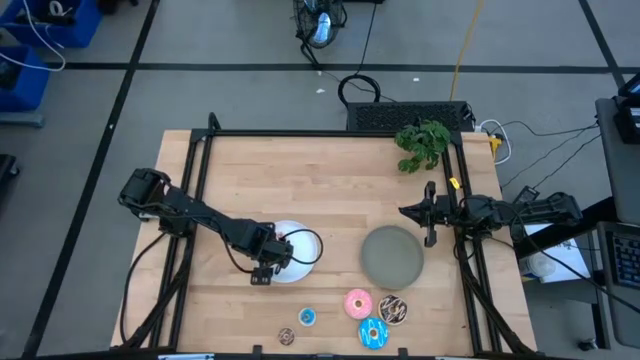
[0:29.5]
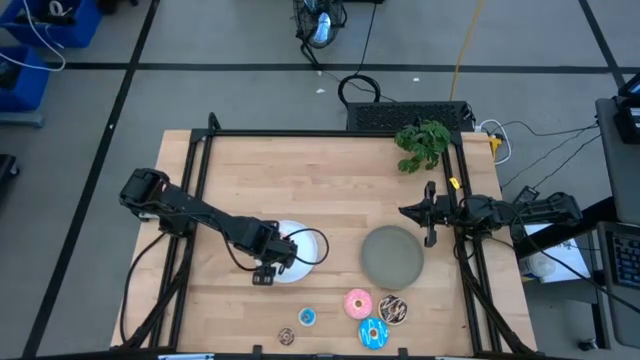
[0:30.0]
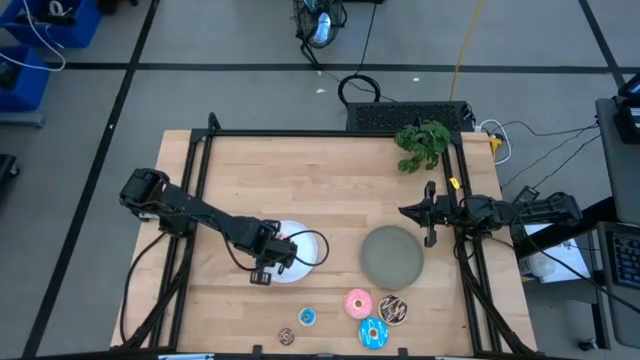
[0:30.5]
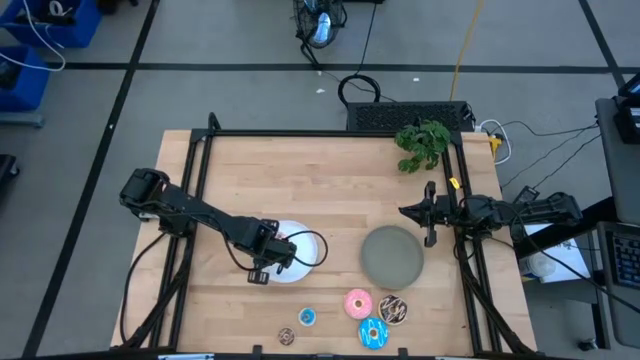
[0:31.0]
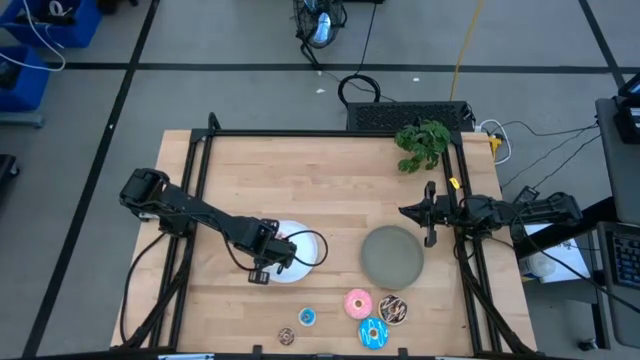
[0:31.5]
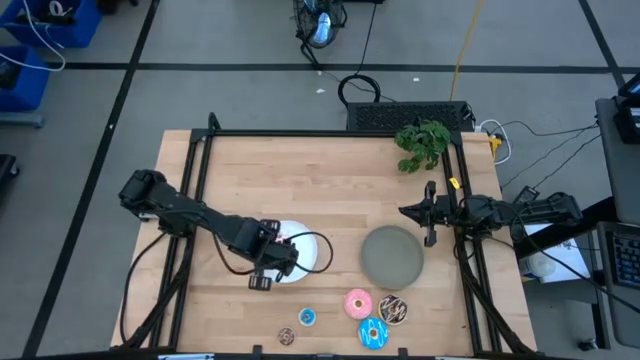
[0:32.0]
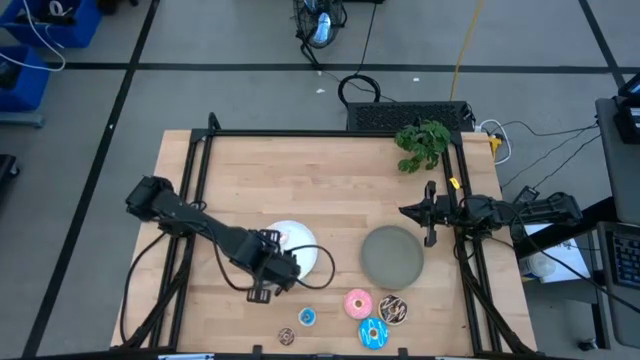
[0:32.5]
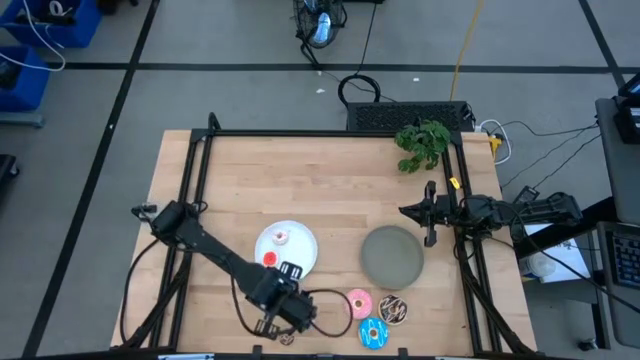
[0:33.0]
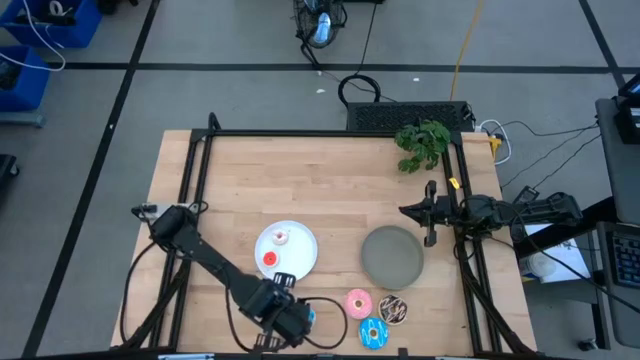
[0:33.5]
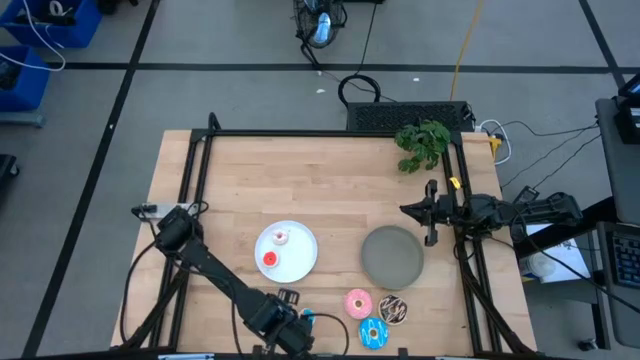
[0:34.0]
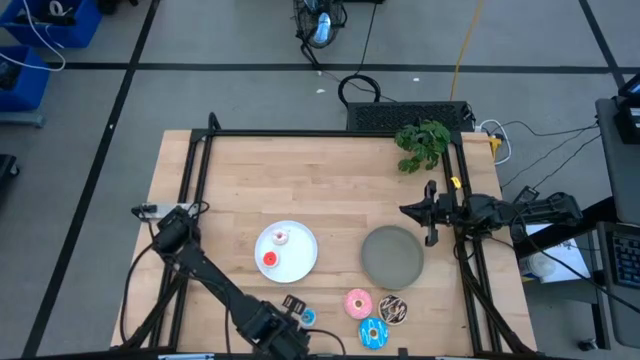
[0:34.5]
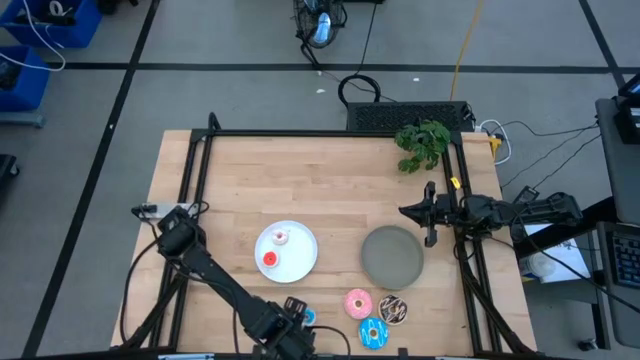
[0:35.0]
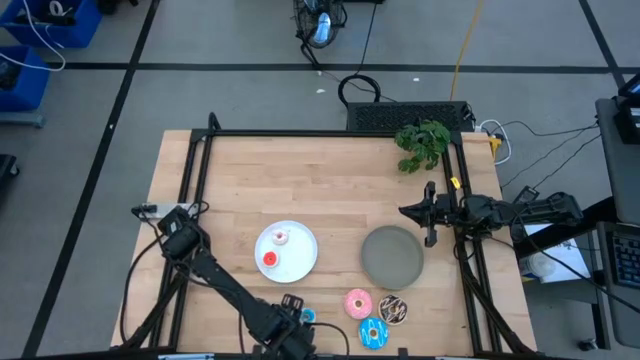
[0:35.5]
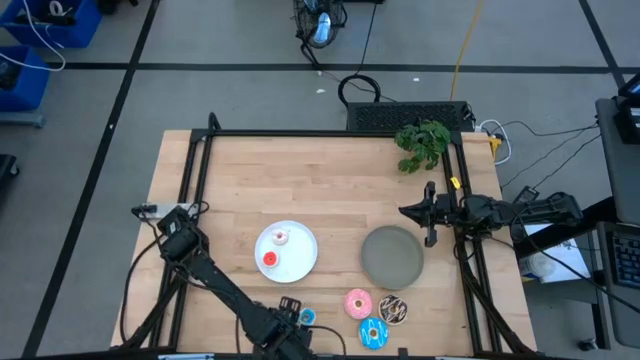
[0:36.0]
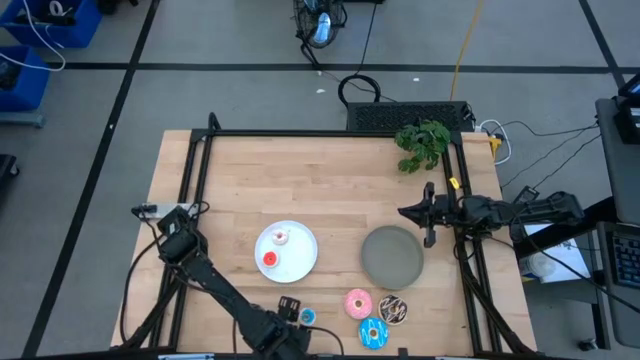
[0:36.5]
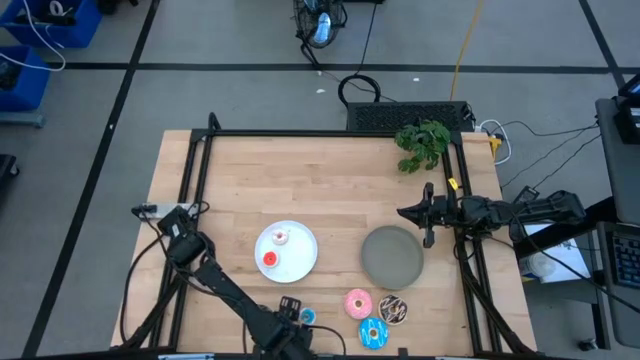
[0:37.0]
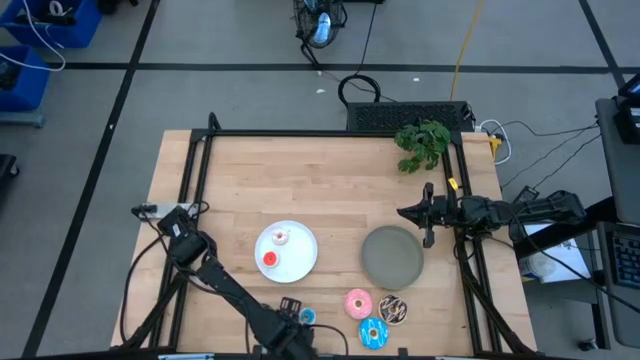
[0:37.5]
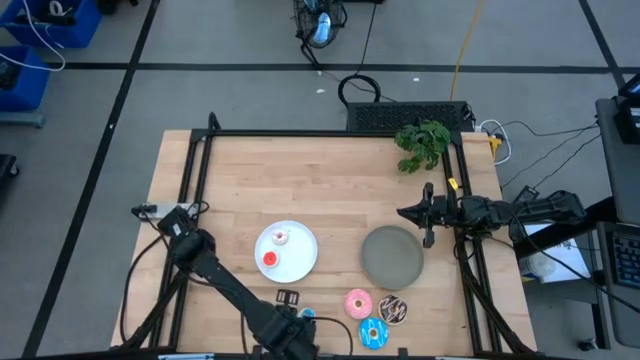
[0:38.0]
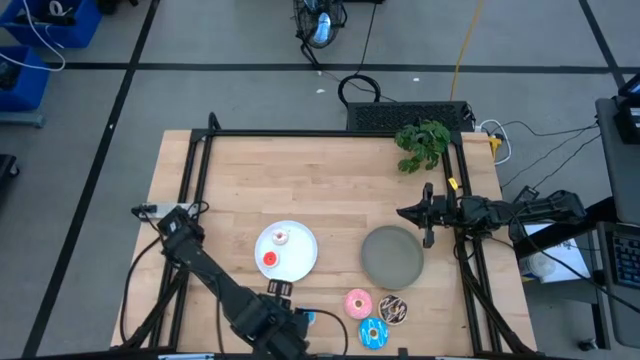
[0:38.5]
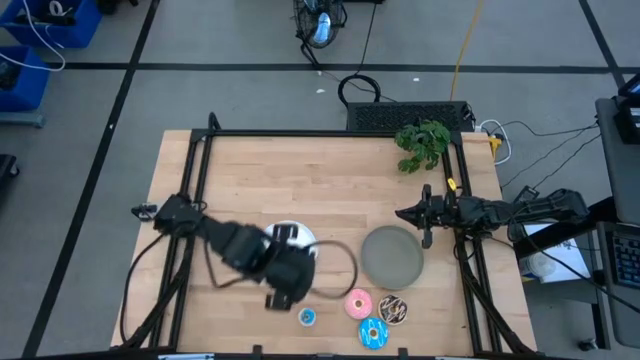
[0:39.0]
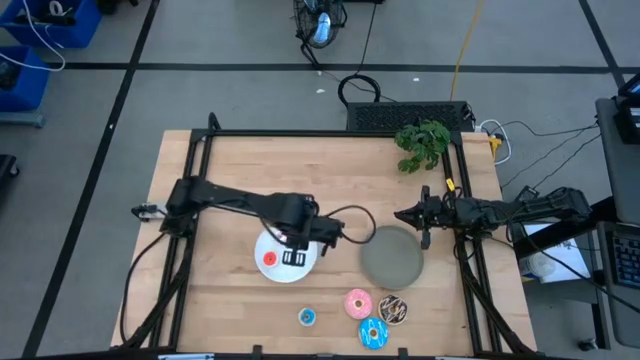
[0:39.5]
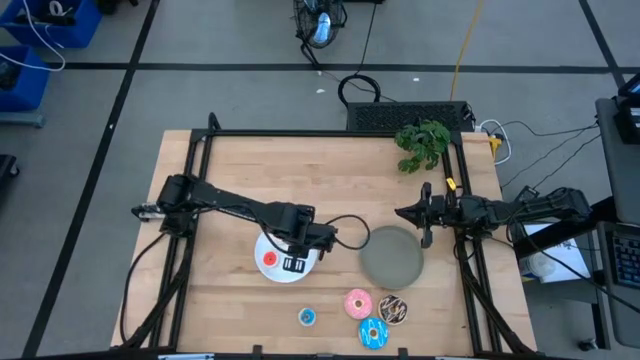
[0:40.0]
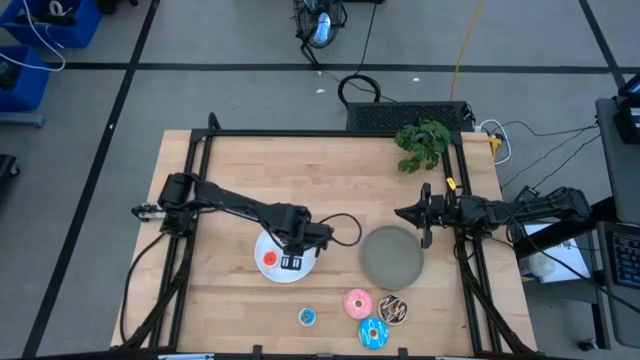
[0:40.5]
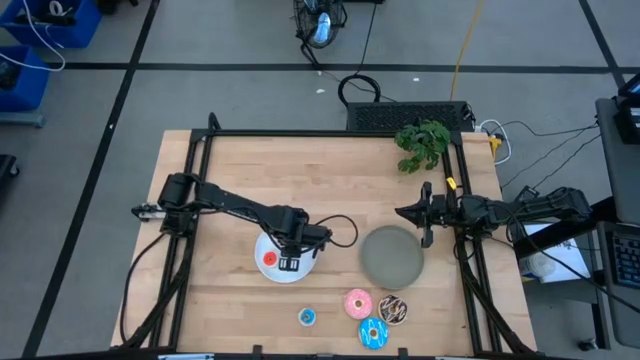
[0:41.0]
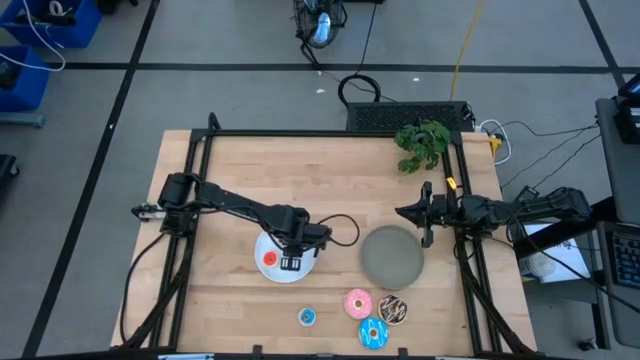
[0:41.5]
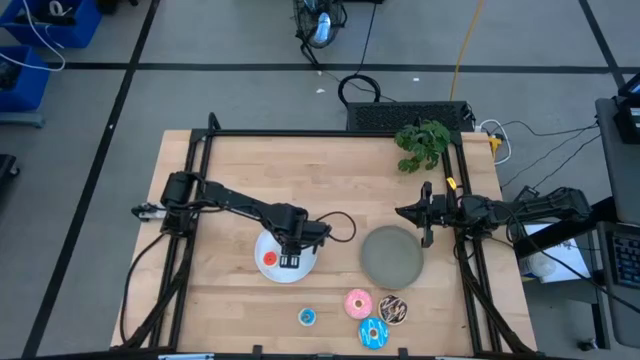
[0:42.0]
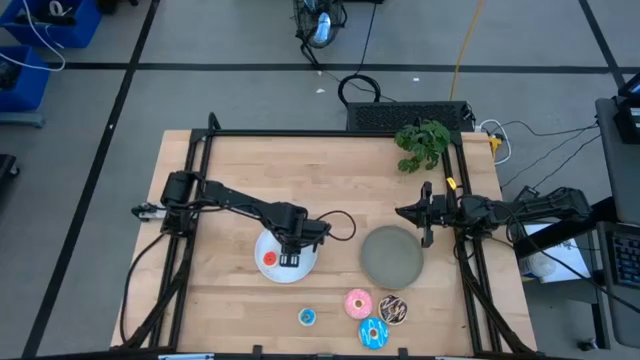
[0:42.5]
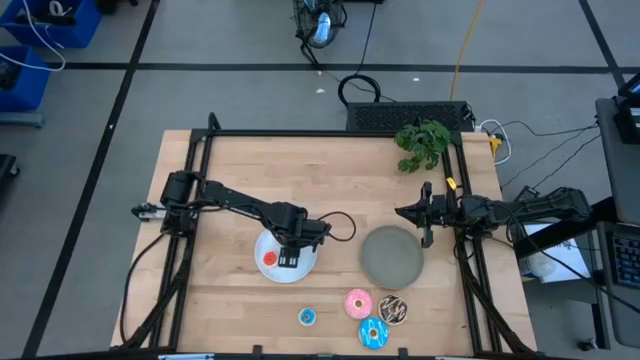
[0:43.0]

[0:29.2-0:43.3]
Task: Pick & Place donuts
Put the small brown donut on the white plate

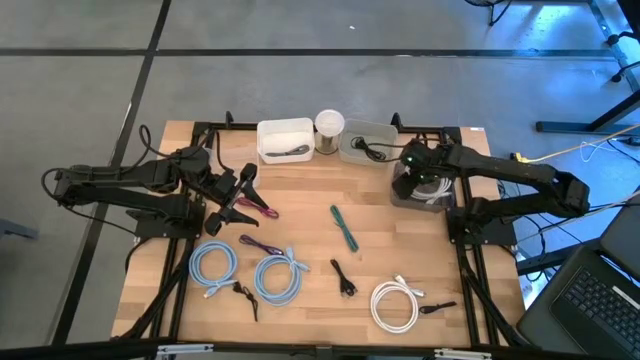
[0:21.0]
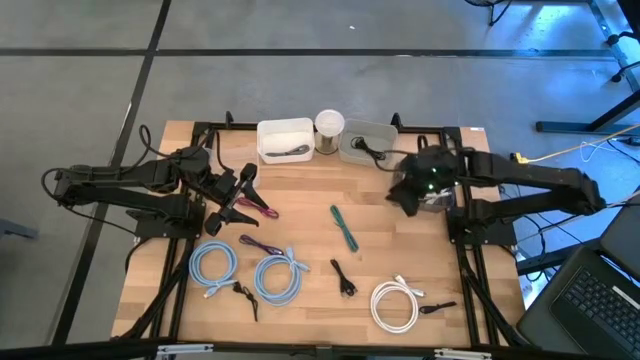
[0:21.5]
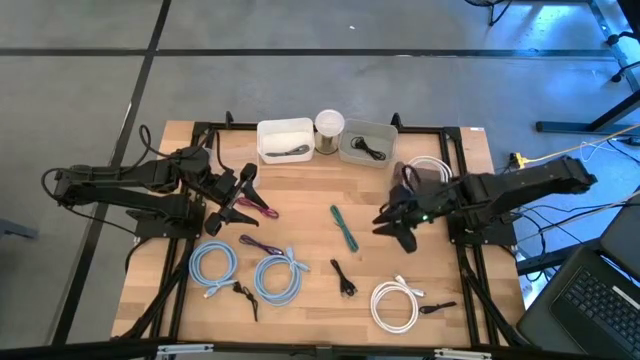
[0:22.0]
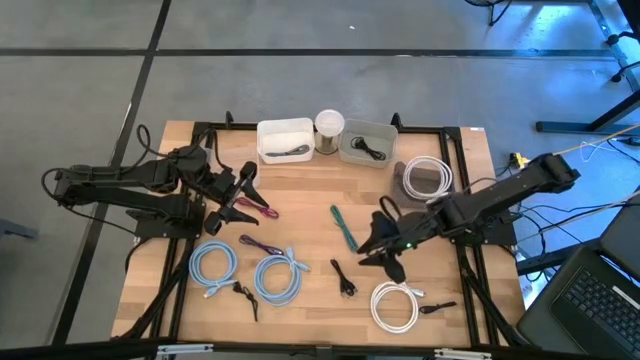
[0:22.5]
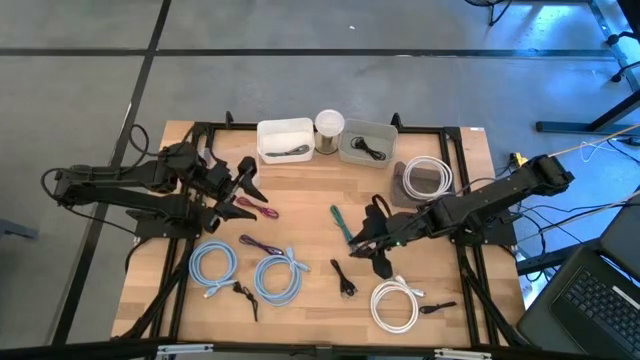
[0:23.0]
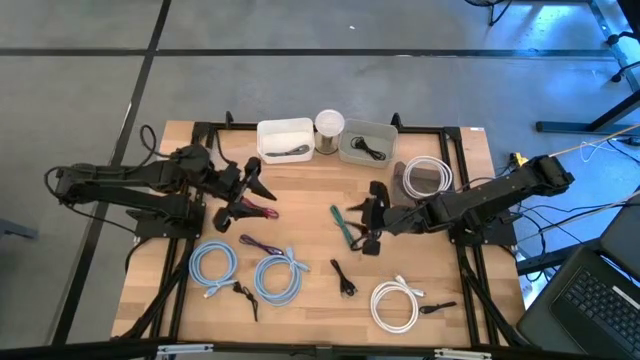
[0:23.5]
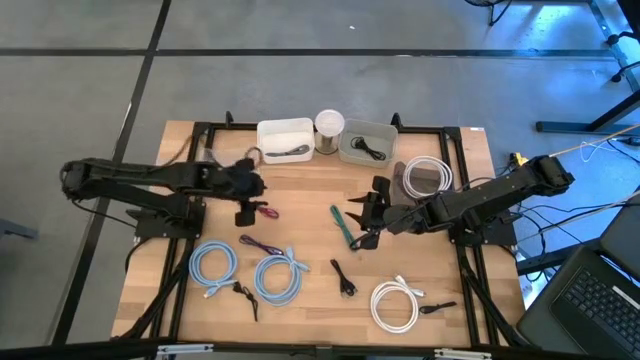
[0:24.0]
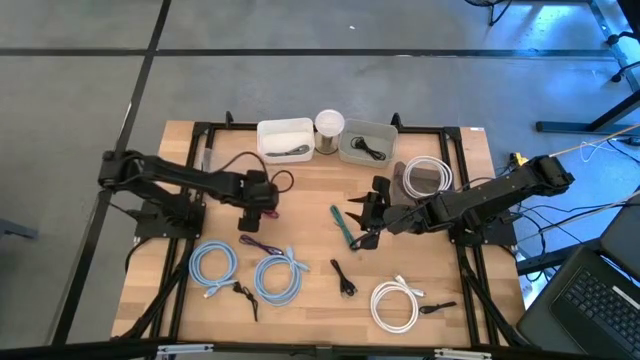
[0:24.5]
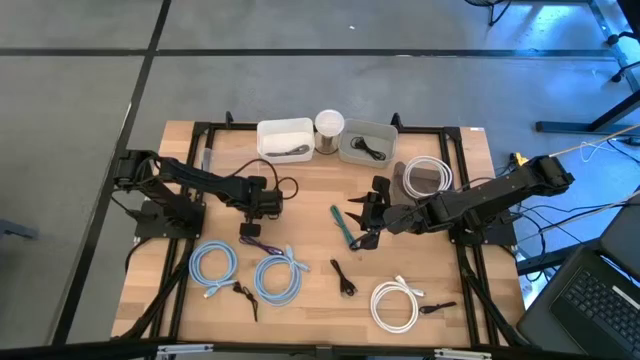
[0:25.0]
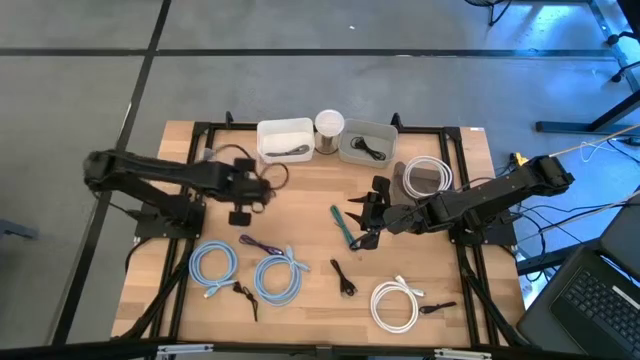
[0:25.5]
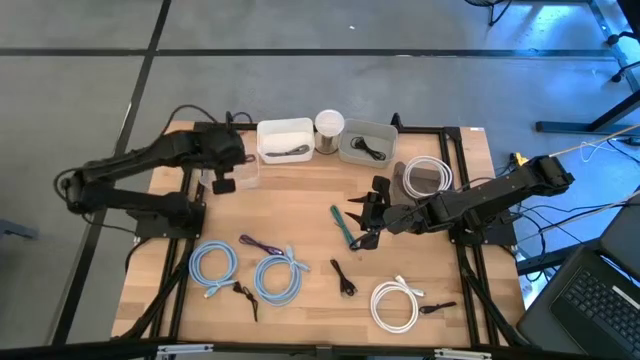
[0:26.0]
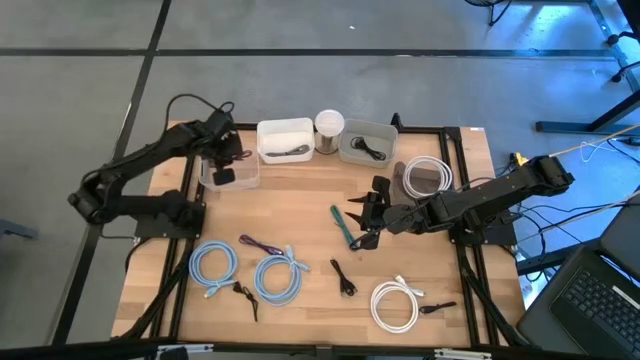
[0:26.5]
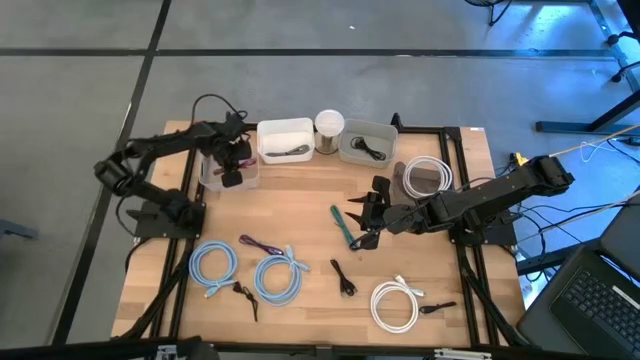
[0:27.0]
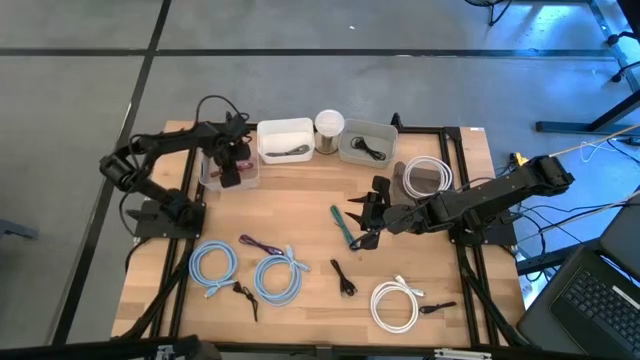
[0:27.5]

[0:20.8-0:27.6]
Task: Pick & Place USB Port
Put the black and pink USB cable into the transparent bin
